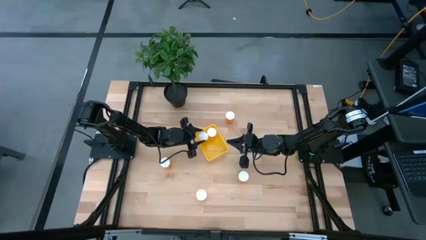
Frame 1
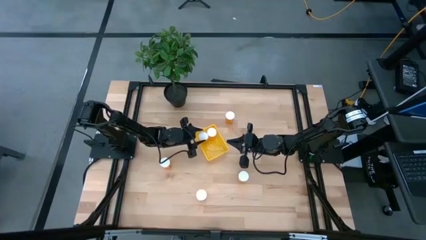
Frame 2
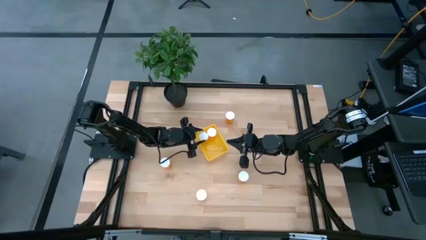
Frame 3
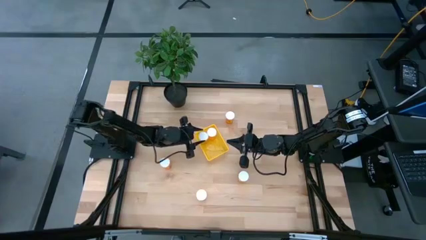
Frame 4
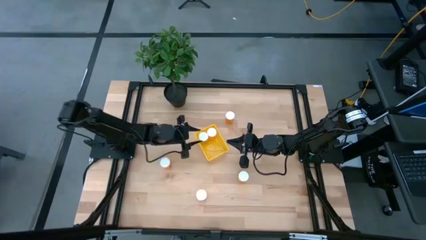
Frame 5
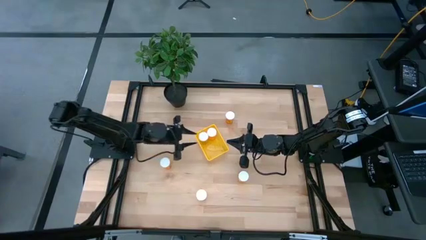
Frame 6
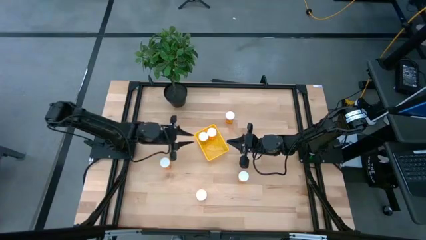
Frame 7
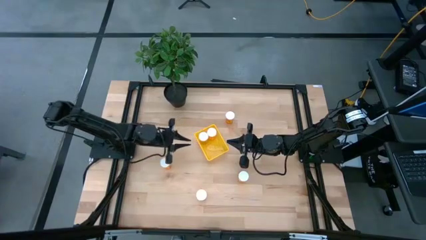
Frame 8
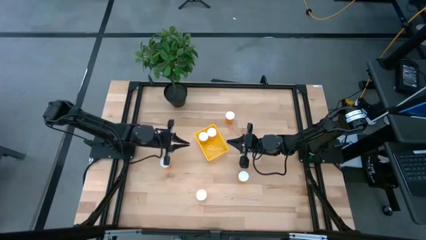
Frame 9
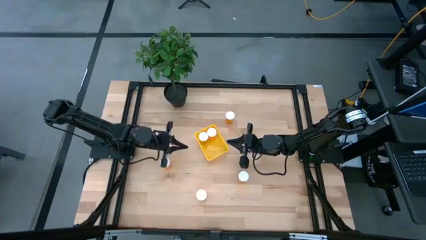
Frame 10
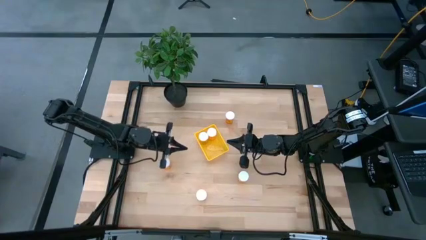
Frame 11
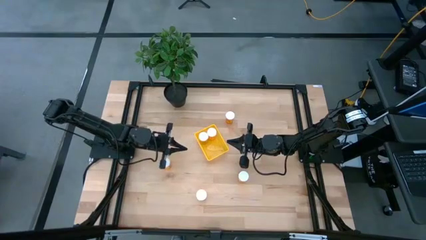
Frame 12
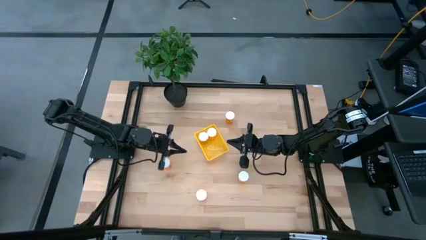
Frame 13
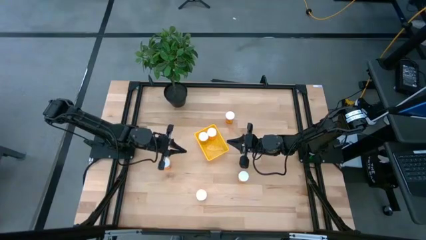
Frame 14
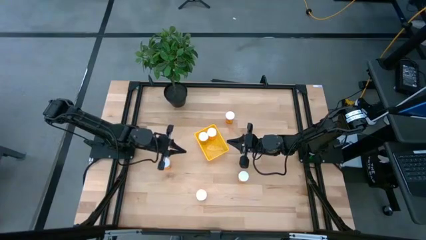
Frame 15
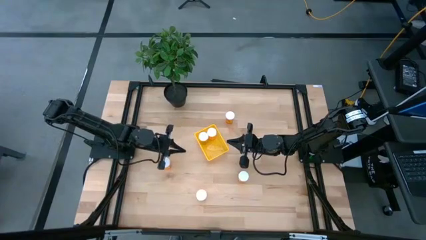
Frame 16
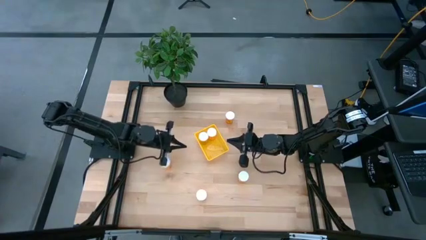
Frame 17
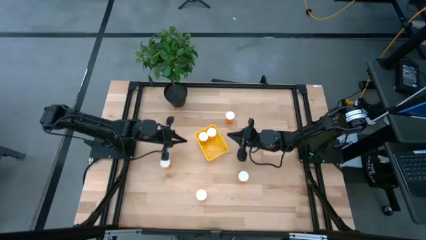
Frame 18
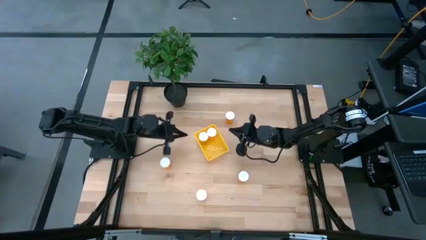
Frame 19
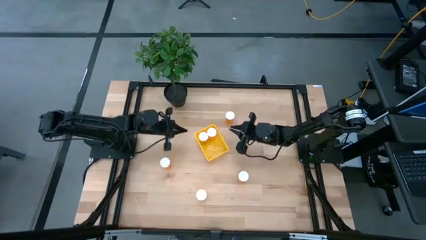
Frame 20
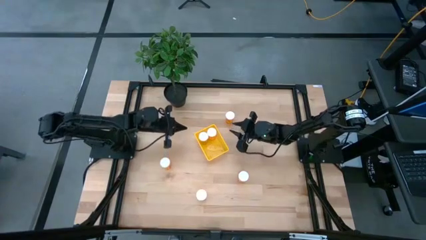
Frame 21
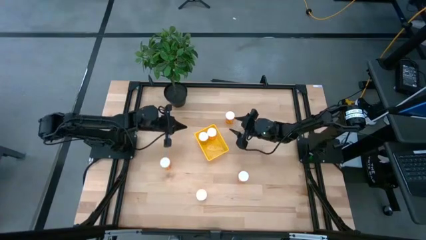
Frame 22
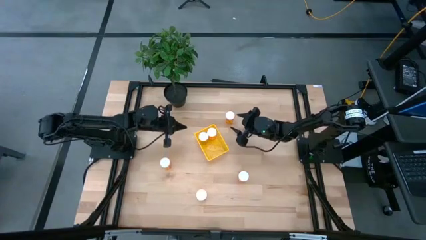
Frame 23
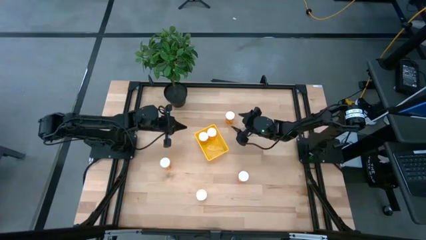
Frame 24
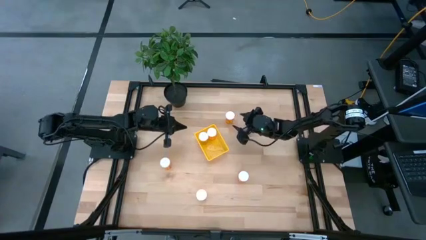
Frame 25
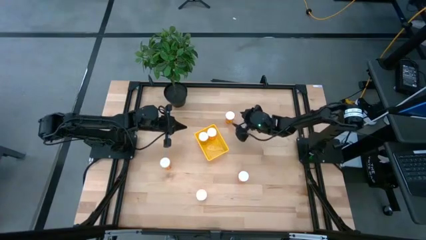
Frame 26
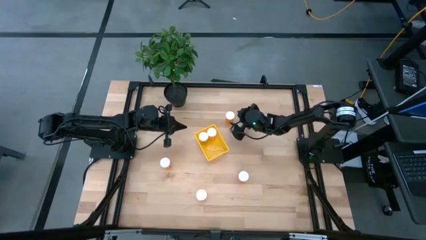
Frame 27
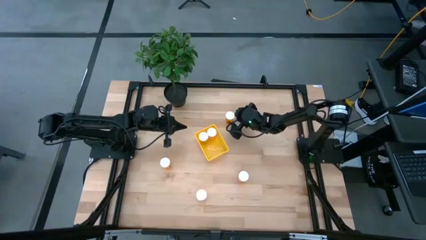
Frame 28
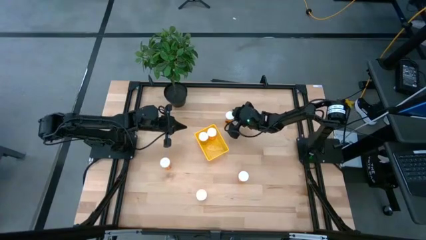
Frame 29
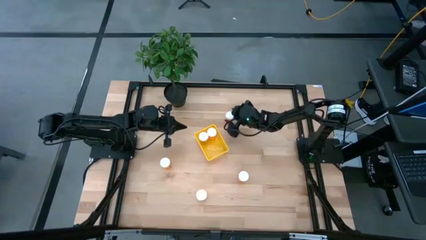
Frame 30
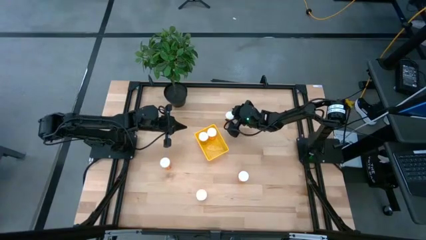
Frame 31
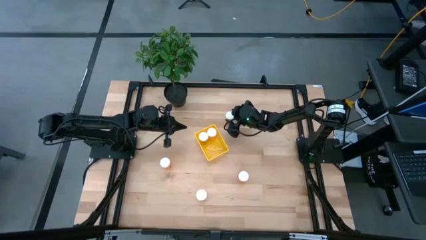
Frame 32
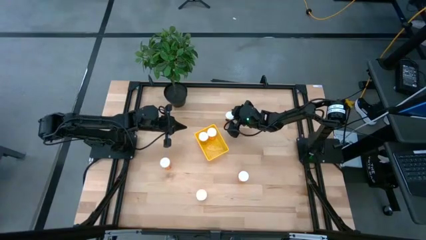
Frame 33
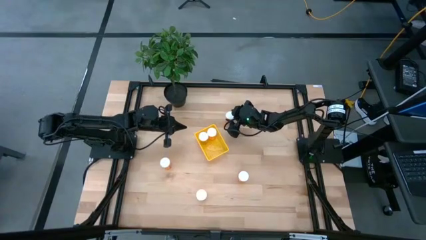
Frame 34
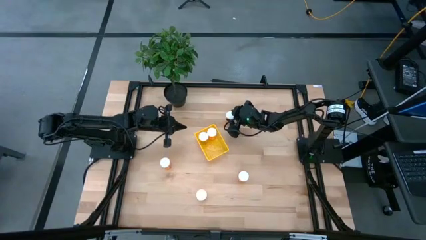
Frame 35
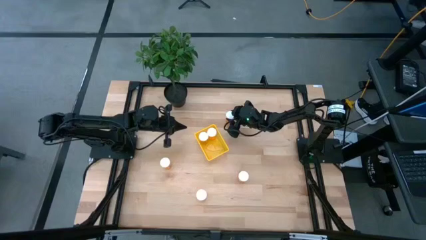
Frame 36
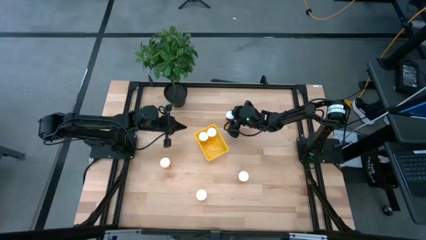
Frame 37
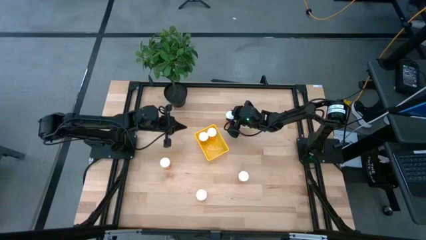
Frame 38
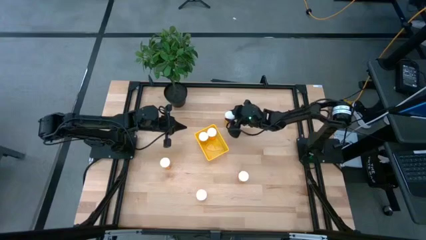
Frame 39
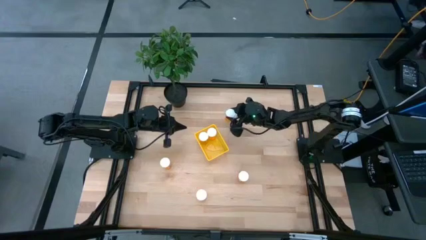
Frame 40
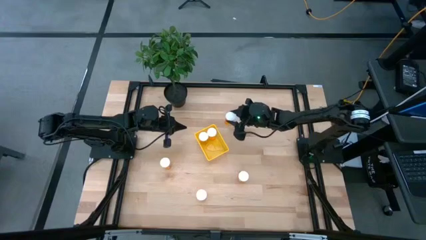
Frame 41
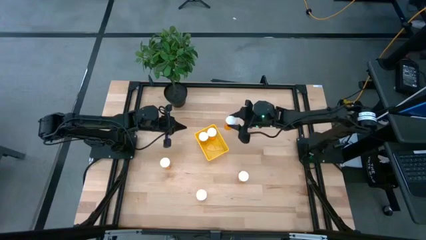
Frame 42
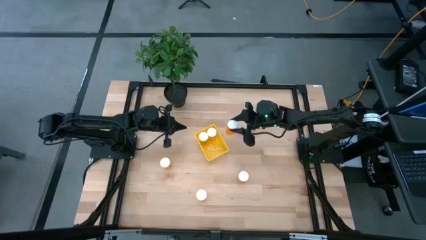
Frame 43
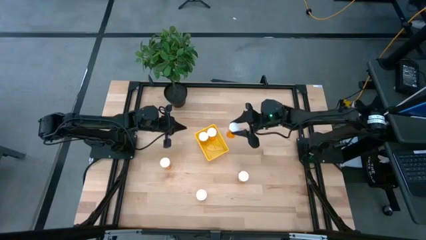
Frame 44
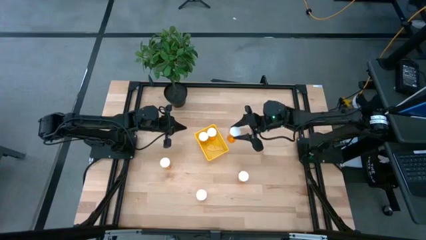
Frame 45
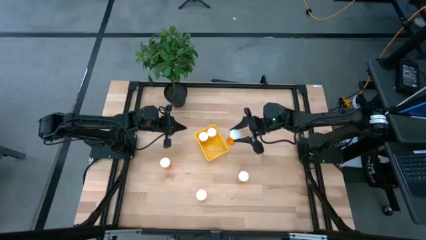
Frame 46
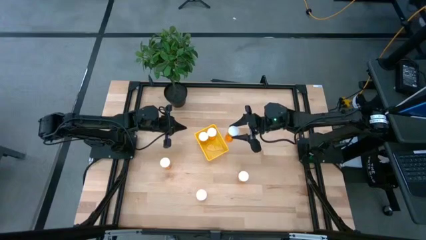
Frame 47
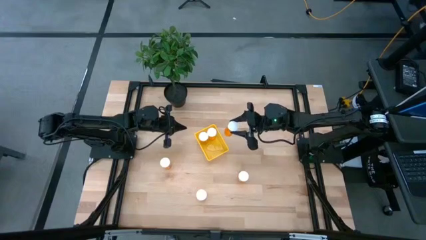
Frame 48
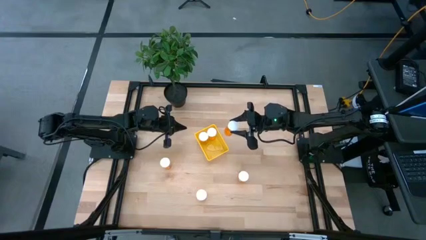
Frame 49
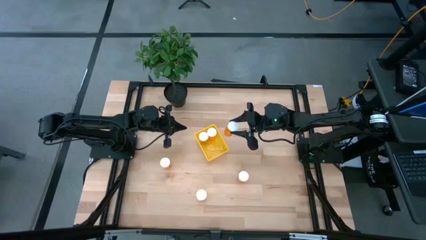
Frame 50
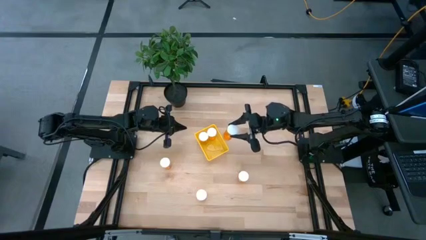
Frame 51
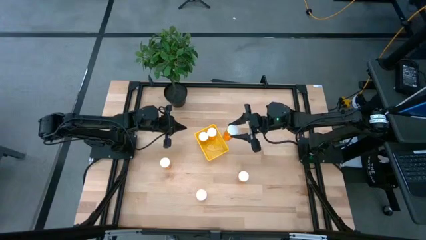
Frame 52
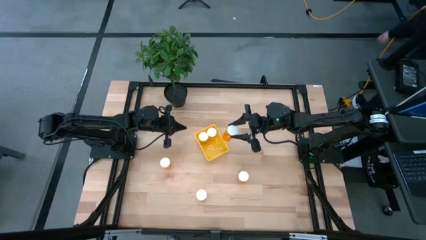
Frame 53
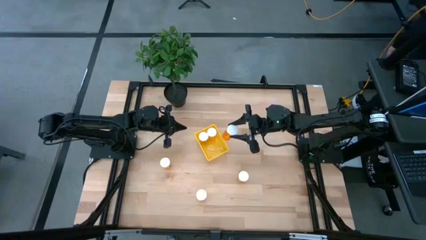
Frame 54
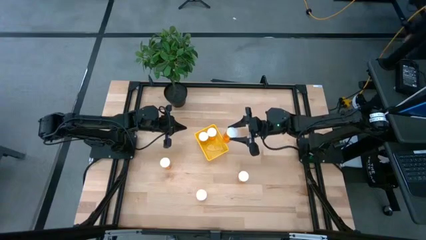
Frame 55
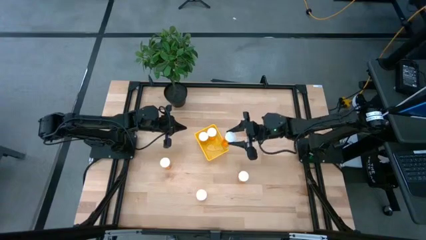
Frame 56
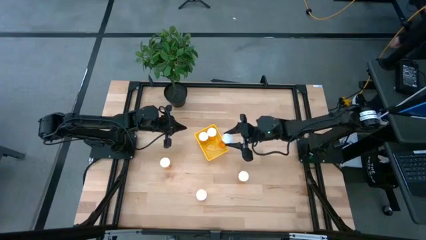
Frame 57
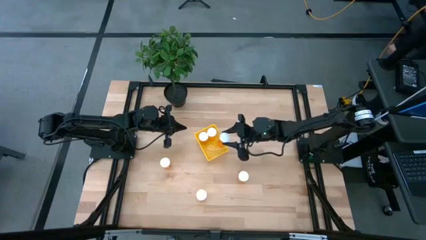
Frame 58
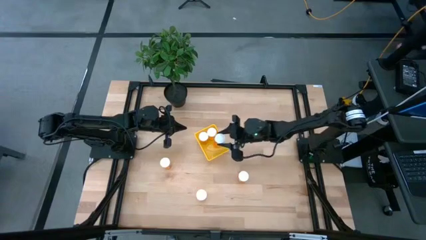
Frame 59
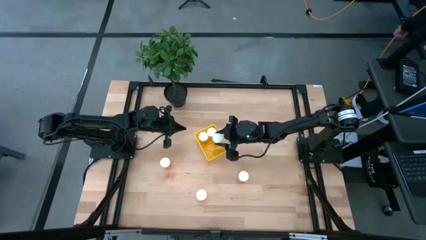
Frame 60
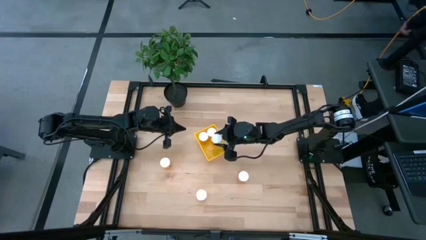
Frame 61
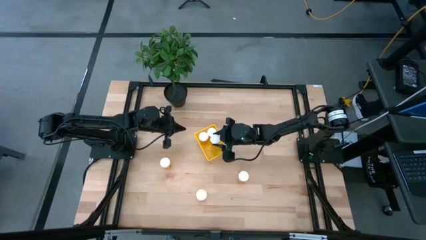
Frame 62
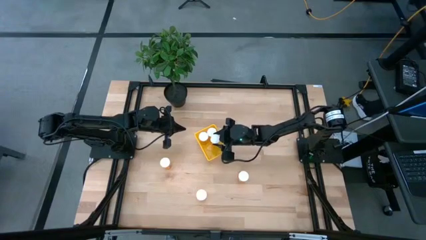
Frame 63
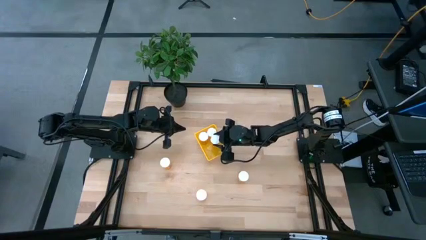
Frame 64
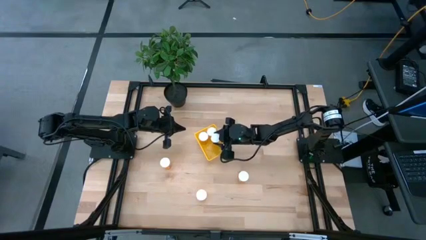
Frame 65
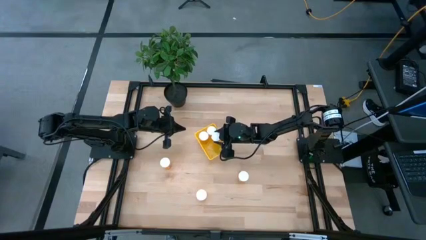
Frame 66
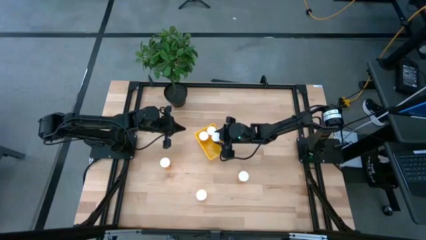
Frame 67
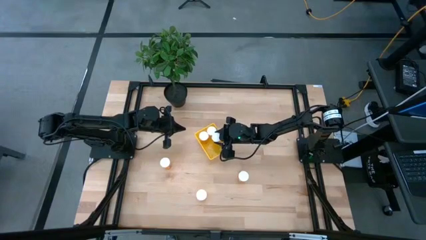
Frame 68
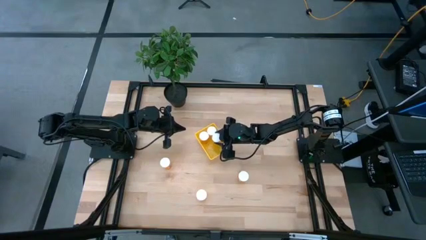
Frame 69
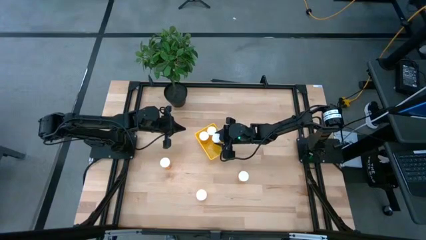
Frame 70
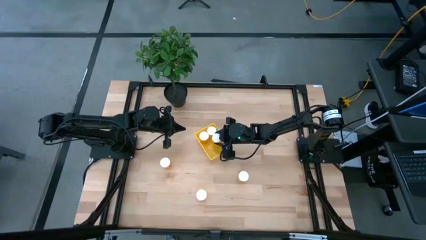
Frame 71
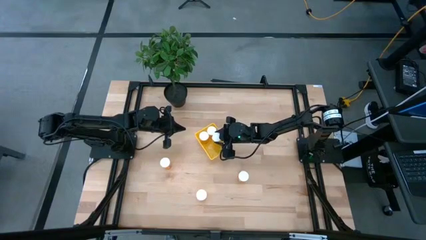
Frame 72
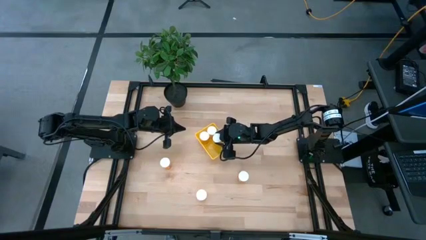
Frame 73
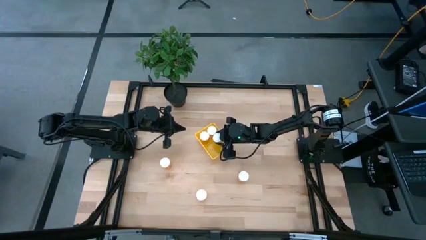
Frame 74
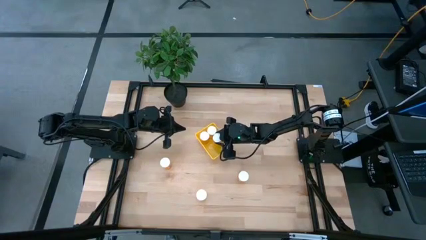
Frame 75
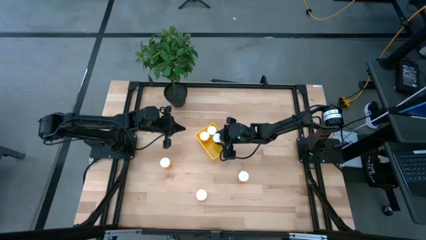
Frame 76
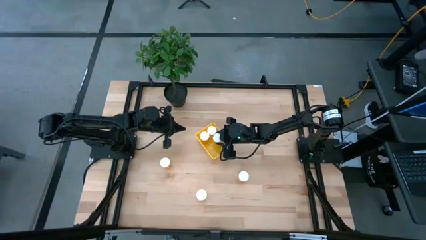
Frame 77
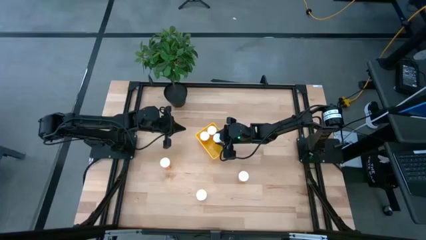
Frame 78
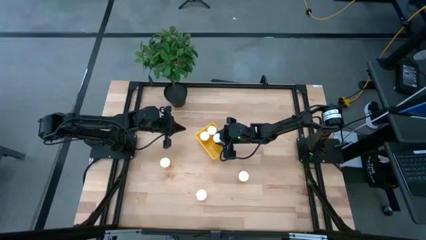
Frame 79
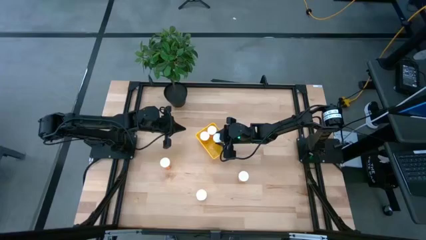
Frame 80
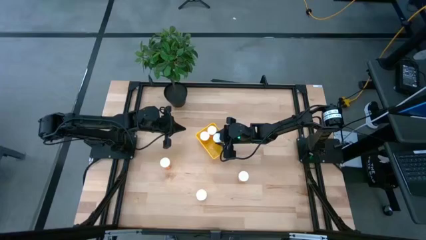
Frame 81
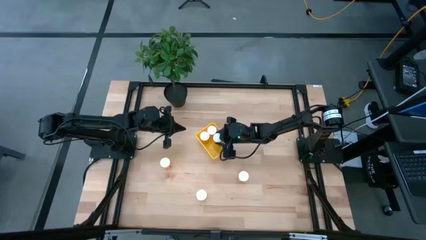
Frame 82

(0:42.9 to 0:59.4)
Task: Pick and place pill bottles into a basket
Put the pill bottle into the bin
